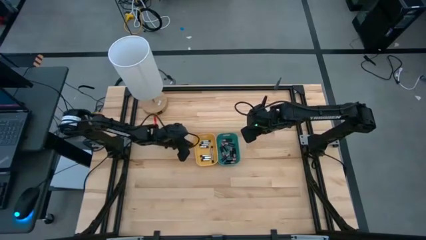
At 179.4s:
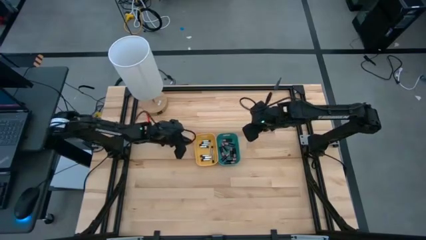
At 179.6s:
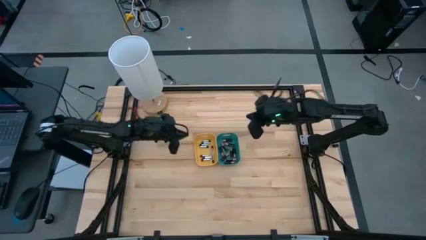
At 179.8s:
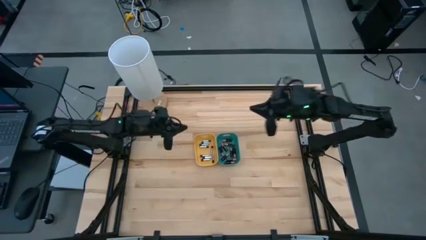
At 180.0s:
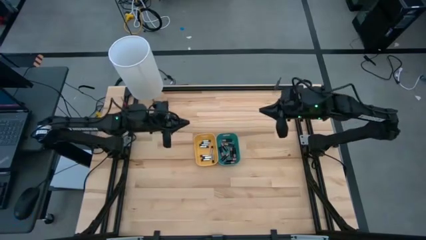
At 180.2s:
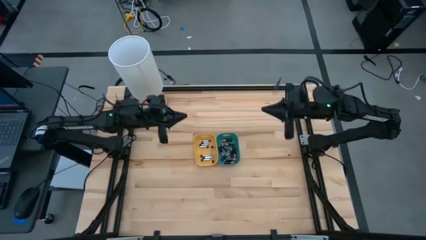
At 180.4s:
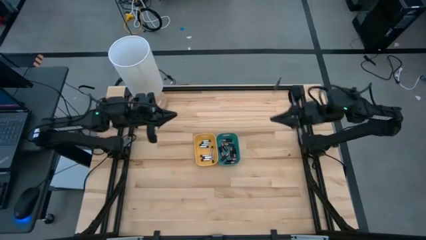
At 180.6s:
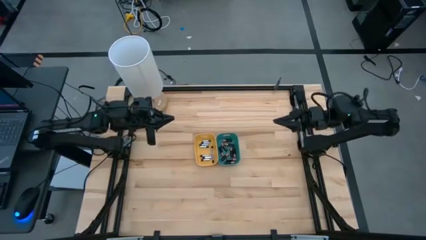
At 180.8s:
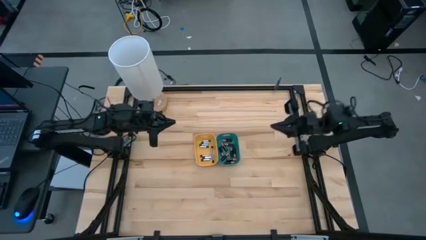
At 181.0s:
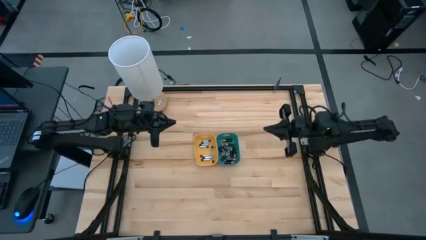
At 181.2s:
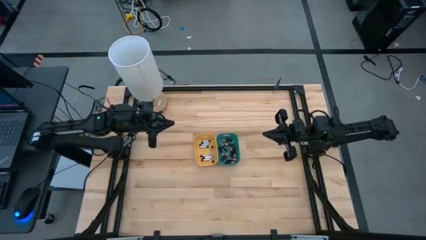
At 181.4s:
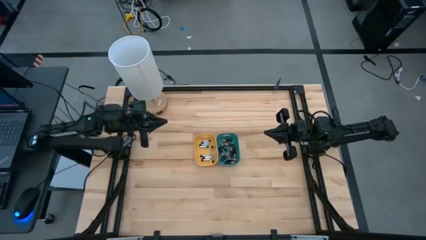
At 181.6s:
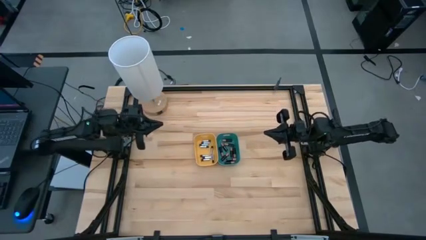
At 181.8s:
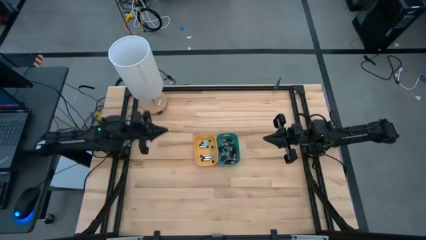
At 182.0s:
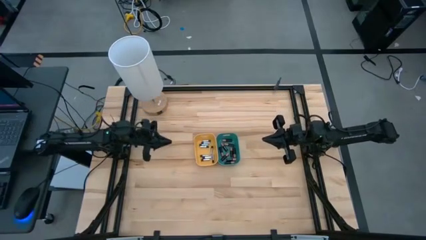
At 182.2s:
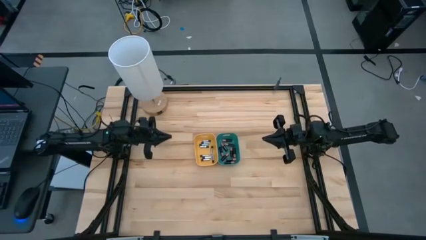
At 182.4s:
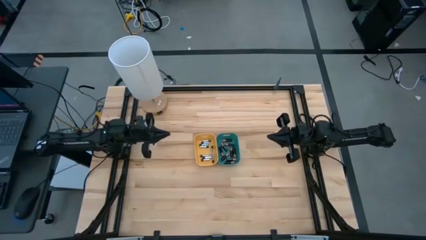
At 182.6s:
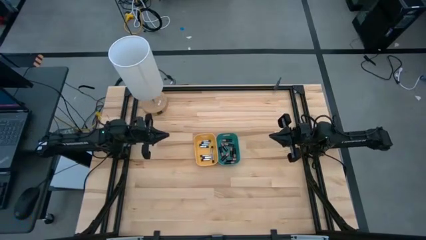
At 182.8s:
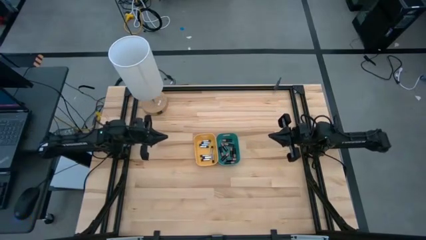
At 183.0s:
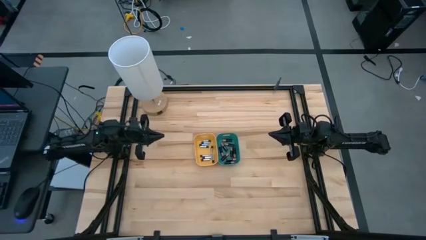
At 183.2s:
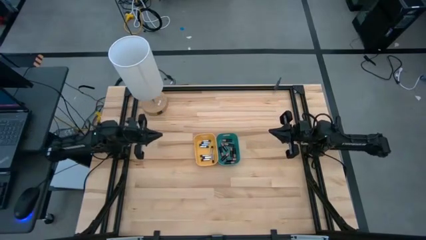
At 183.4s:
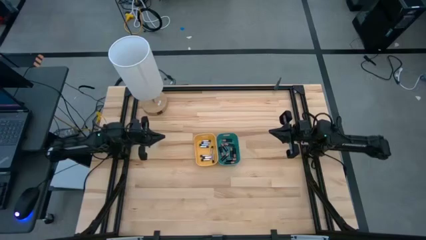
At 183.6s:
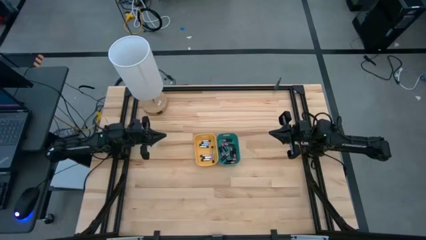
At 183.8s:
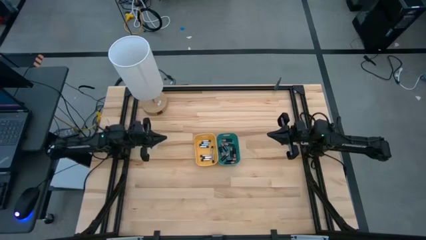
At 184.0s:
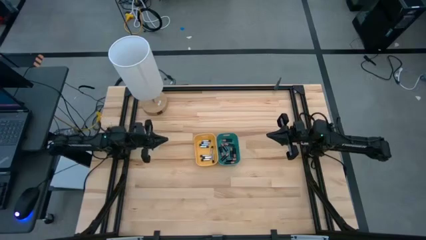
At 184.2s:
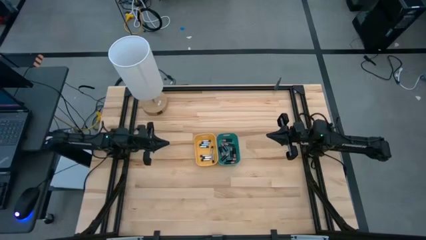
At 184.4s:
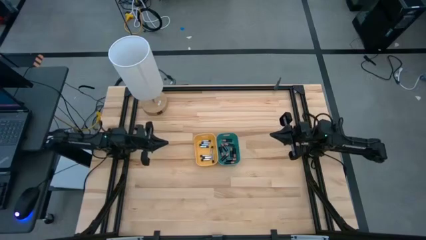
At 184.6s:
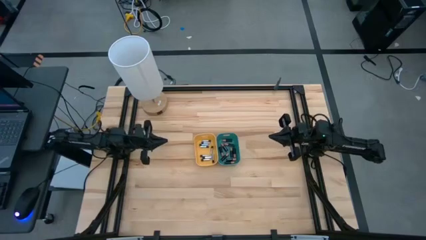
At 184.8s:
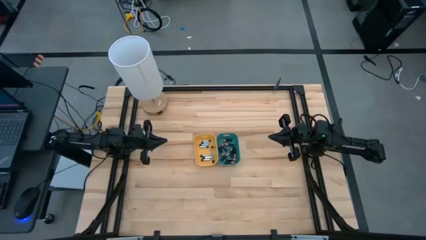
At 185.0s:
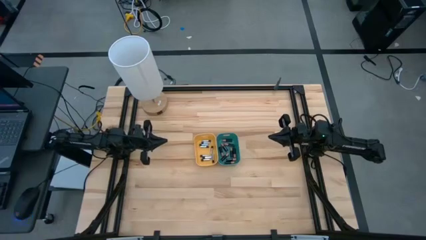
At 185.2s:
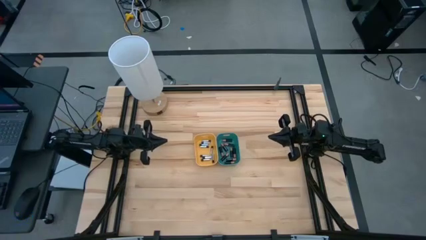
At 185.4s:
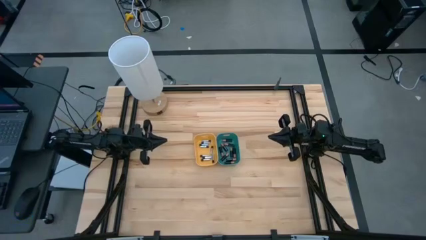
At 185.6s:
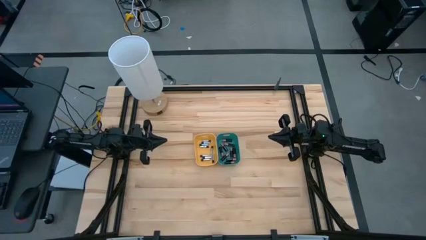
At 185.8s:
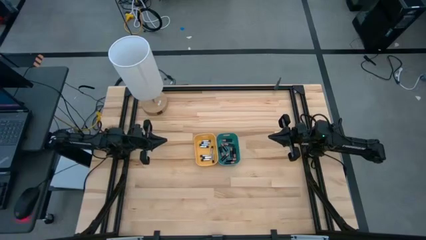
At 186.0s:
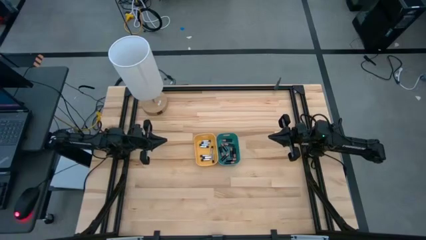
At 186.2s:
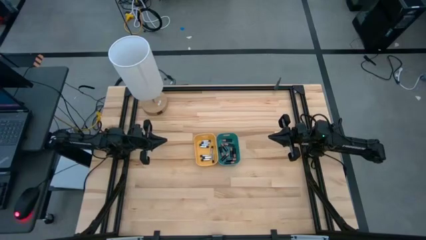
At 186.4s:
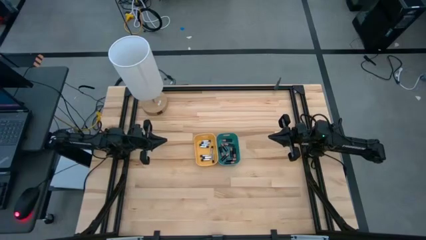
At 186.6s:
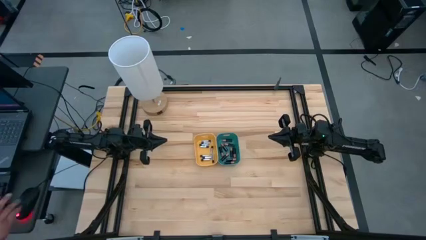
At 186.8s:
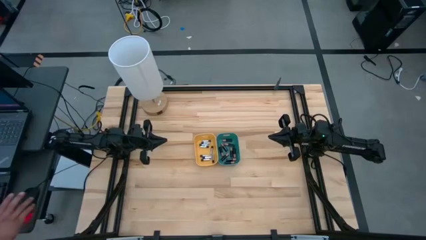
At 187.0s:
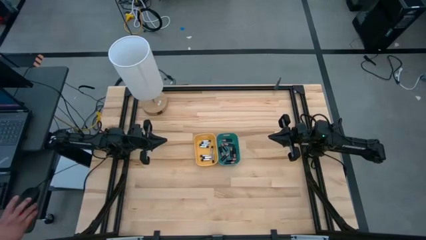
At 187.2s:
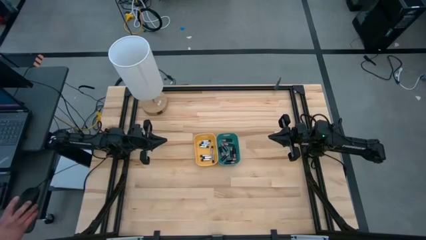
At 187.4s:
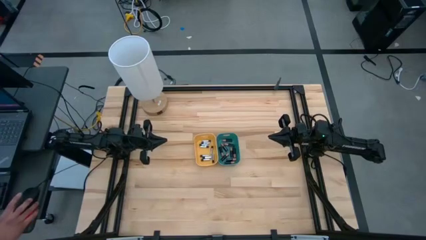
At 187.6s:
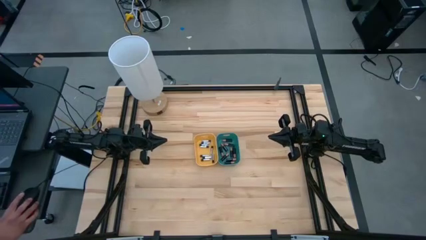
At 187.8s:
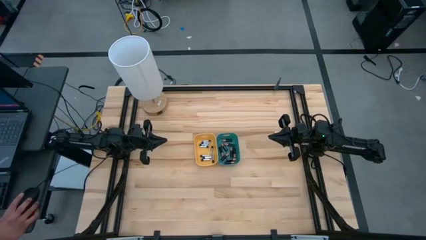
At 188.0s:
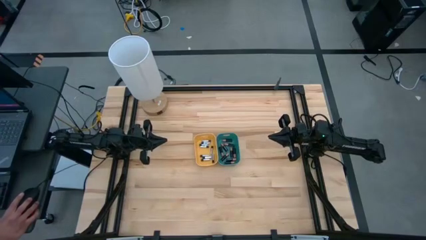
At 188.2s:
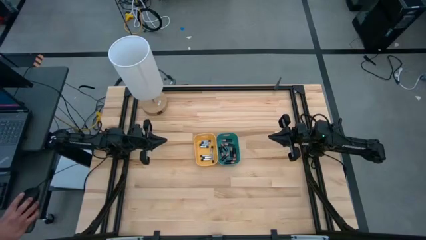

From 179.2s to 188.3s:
Task: Sort batteries
Return to Home Position

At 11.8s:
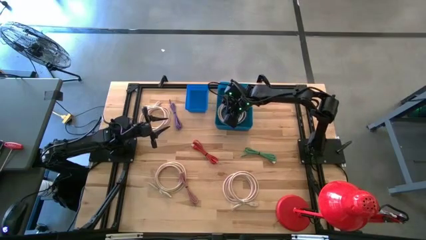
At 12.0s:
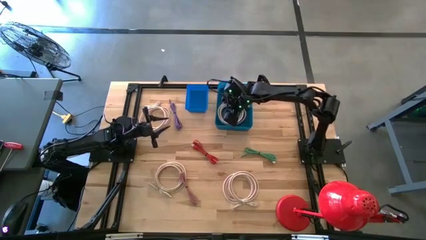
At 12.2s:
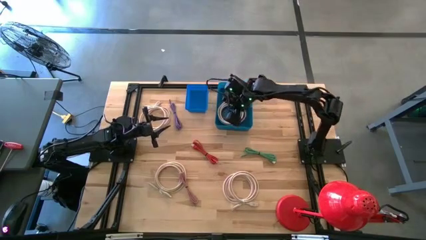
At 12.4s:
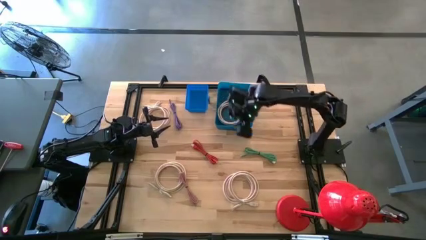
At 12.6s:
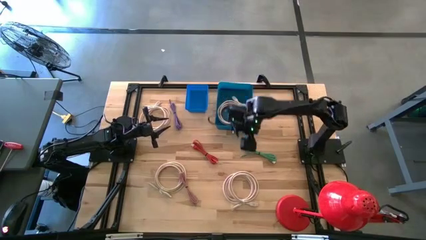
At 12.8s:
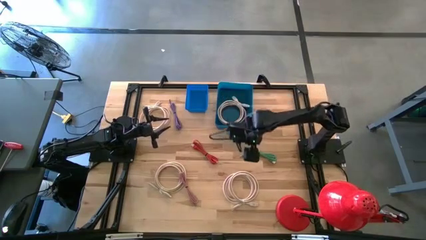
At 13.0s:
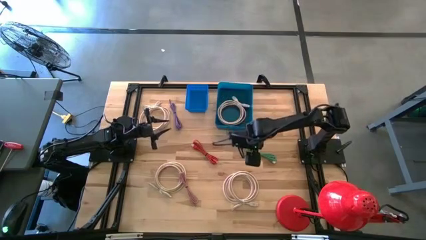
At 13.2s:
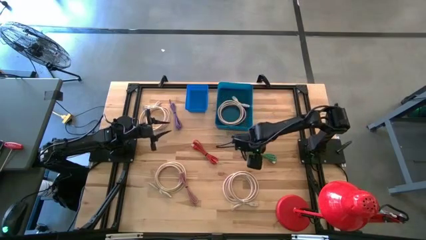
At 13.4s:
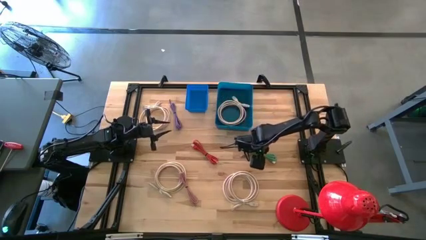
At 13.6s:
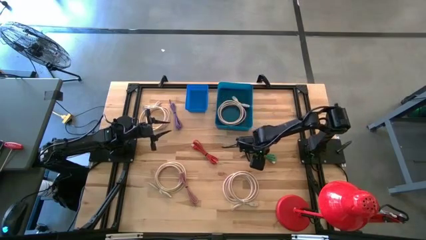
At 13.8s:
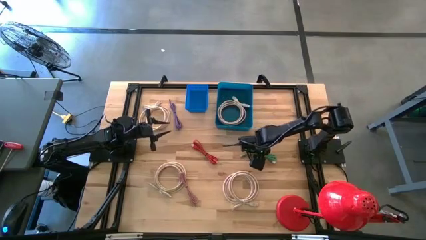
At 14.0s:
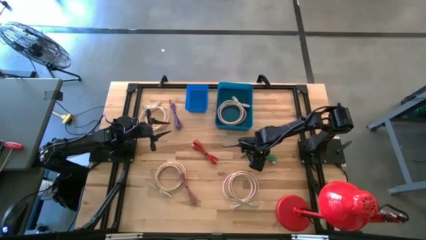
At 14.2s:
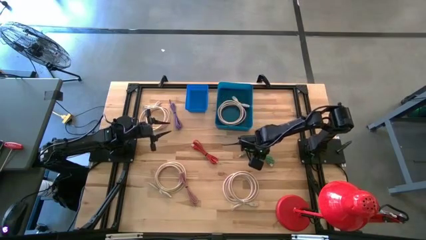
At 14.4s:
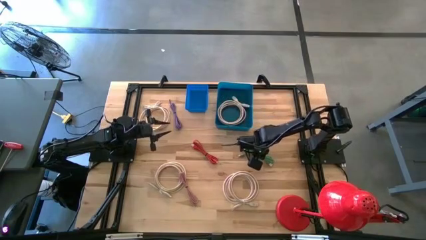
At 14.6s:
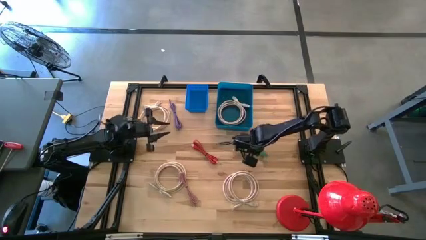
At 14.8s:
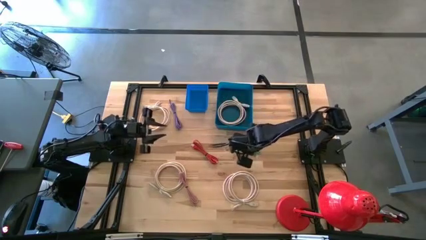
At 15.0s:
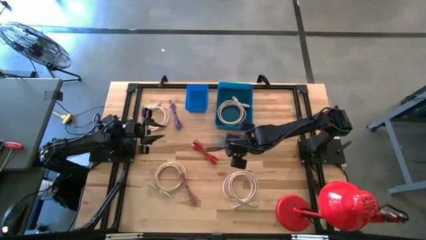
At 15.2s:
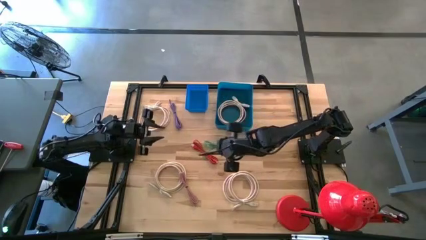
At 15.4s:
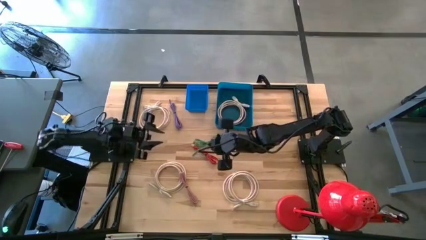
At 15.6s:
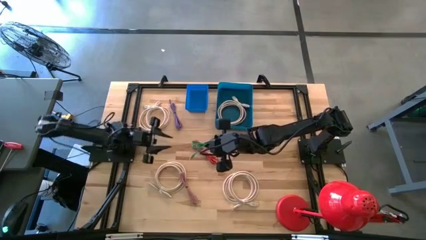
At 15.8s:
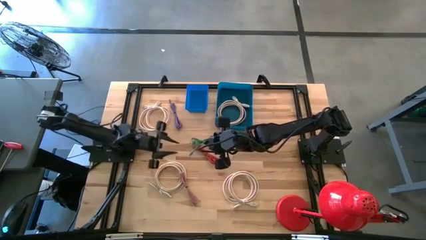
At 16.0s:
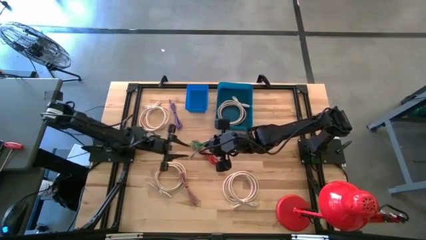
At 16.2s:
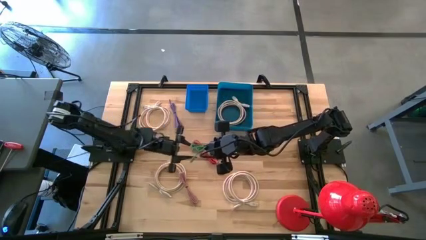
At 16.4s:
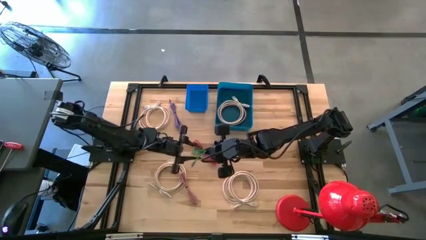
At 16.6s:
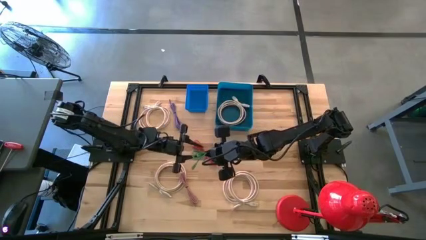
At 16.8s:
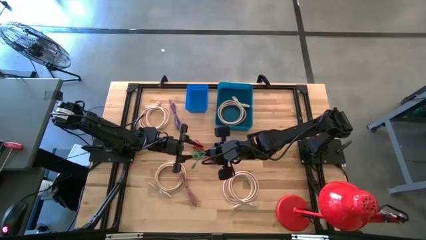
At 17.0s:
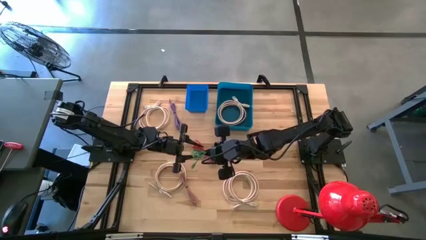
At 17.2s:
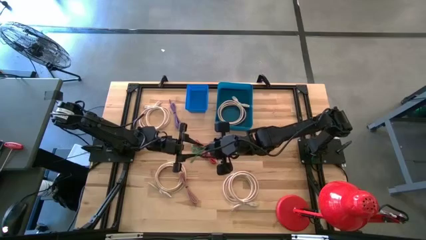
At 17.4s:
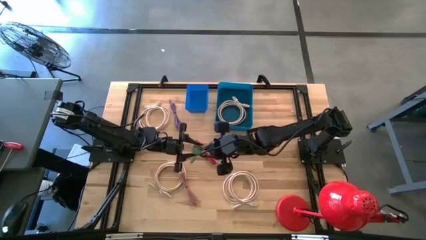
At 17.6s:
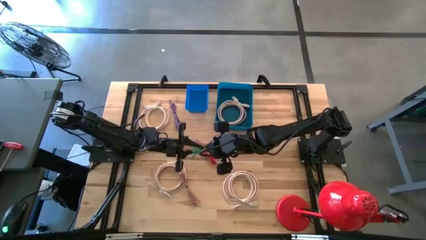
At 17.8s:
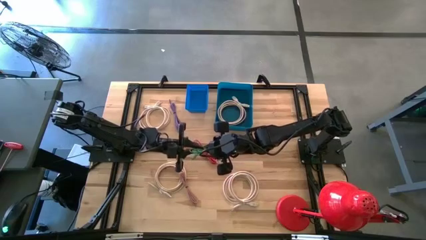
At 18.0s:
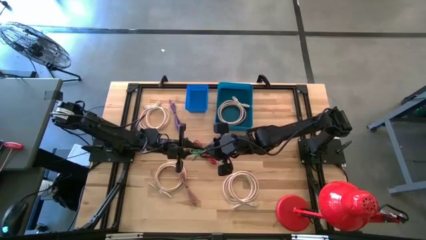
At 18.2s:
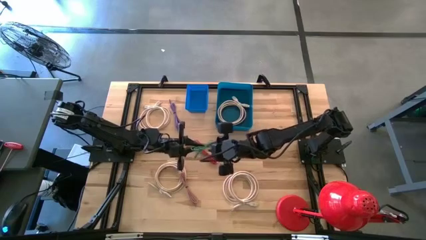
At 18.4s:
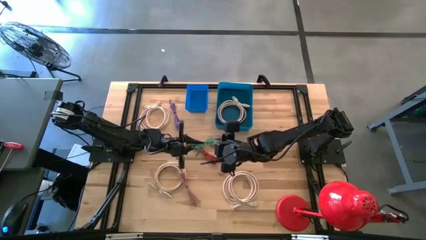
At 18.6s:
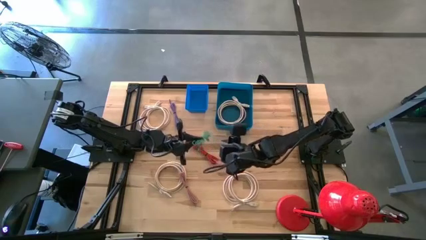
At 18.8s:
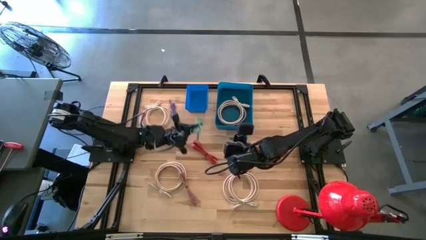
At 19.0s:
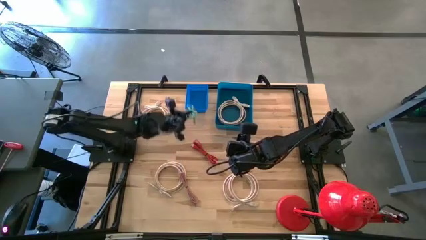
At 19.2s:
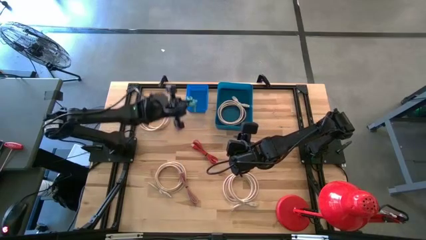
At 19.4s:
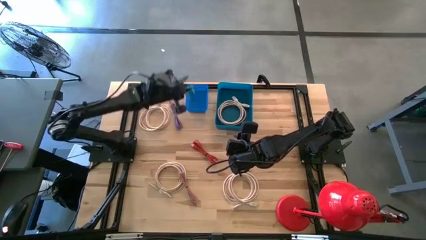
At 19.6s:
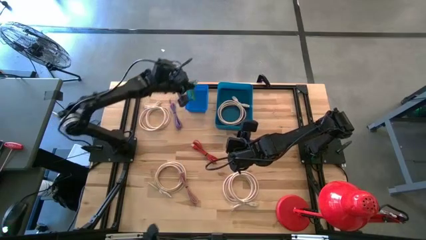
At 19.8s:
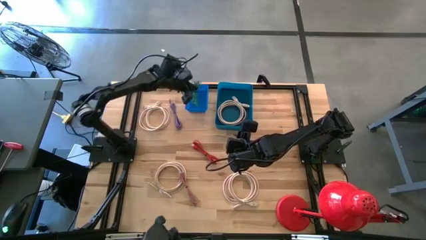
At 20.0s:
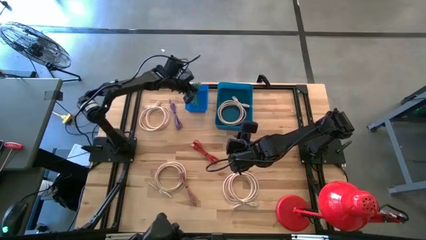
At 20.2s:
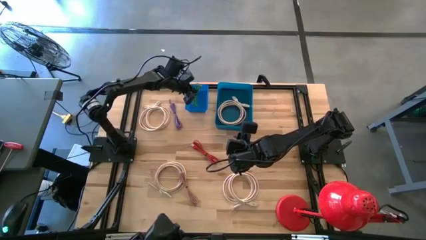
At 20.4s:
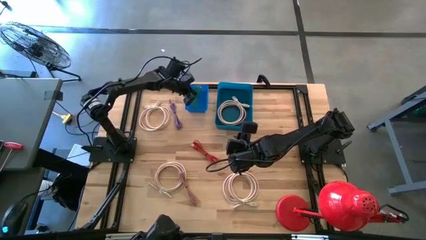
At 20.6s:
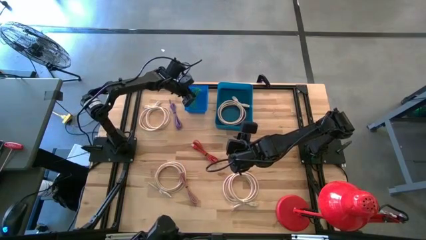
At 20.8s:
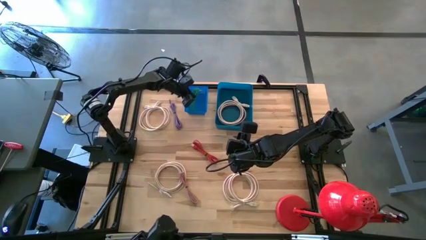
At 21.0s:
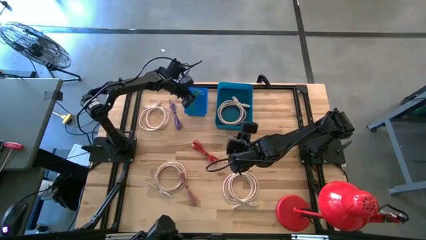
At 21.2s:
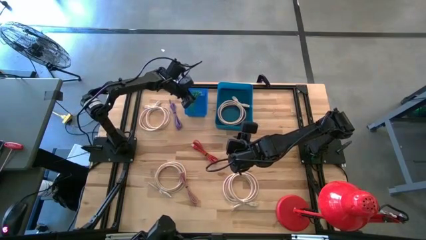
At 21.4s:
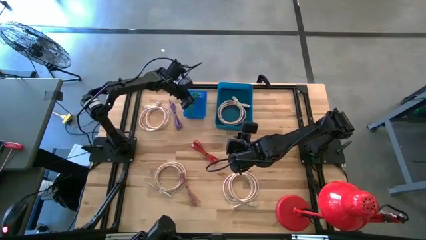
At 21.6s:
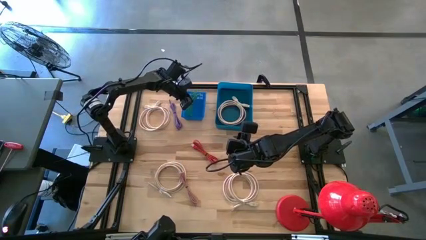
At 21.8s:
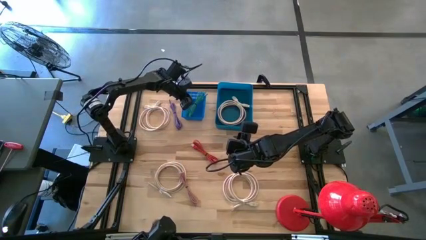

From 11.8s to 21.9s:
Task: Pick & Place USB Port
Put the green charger cable into the blue bin
